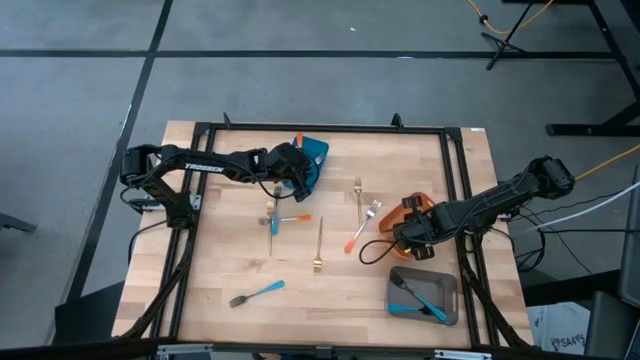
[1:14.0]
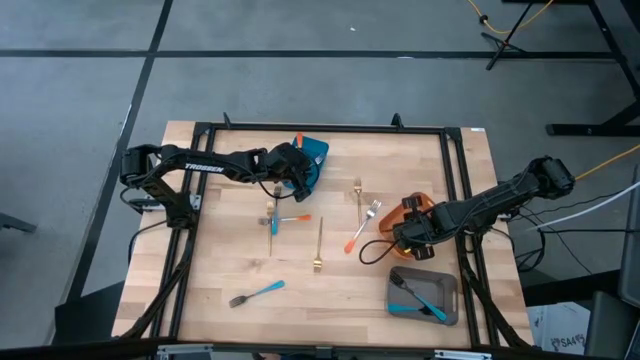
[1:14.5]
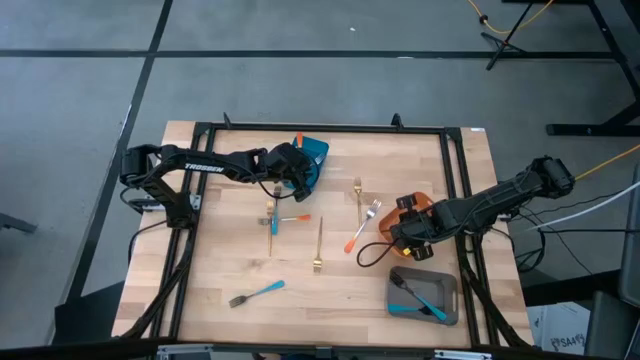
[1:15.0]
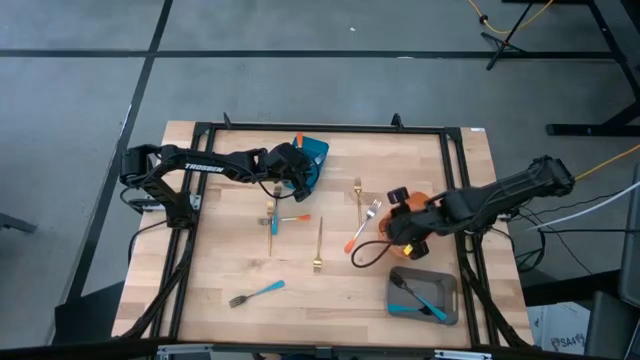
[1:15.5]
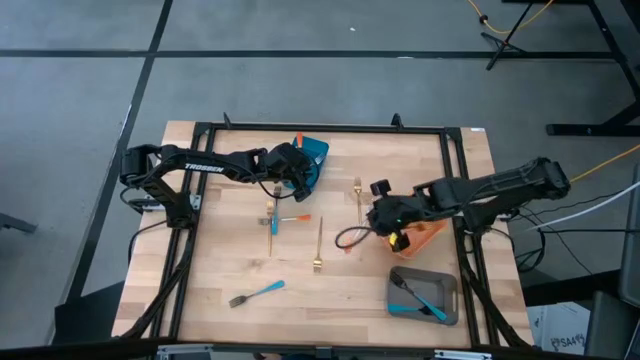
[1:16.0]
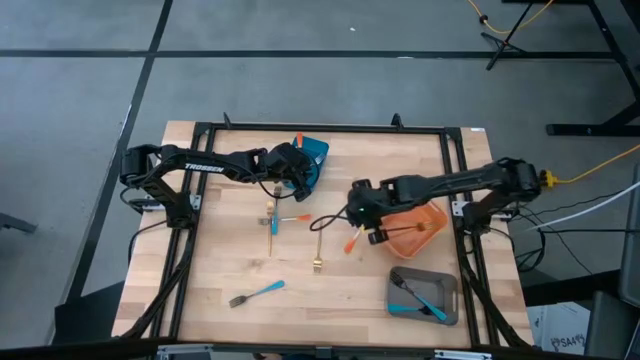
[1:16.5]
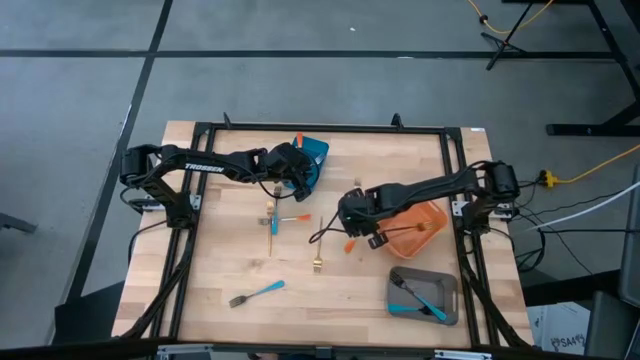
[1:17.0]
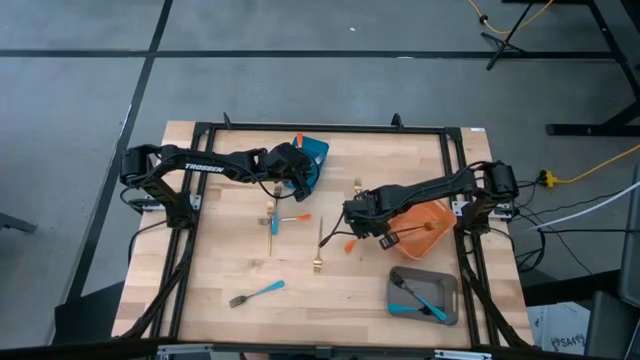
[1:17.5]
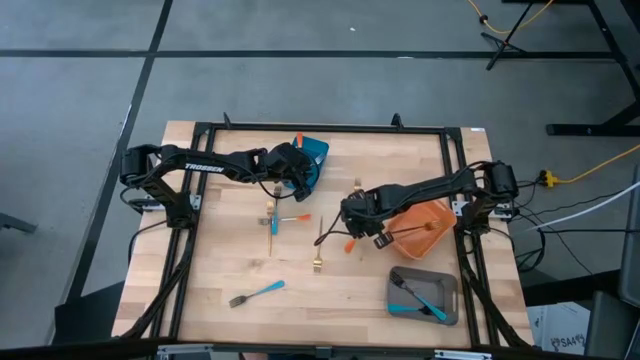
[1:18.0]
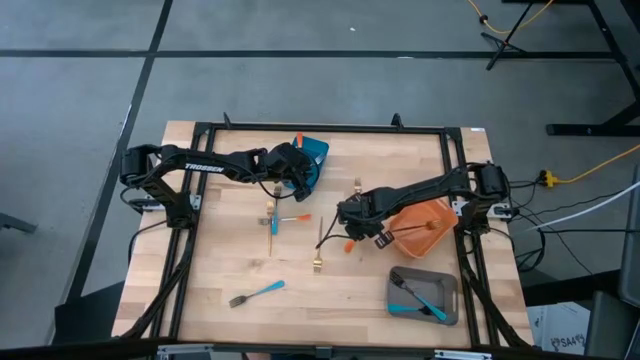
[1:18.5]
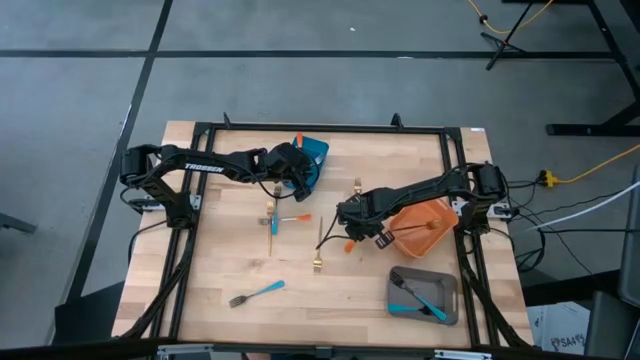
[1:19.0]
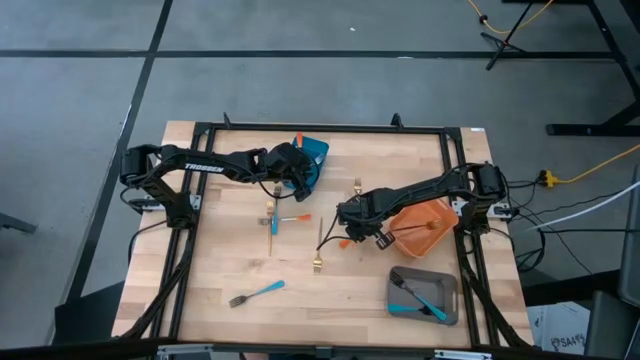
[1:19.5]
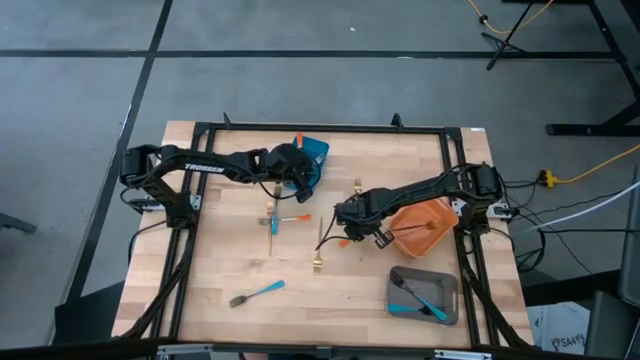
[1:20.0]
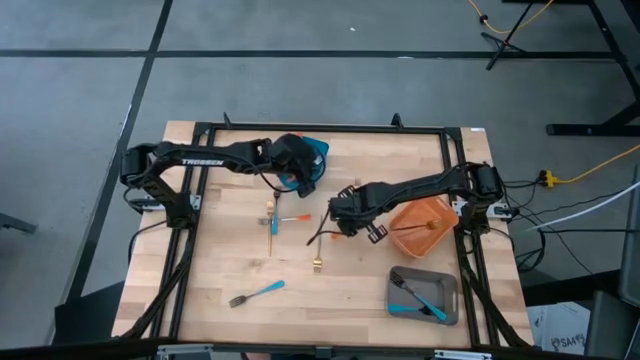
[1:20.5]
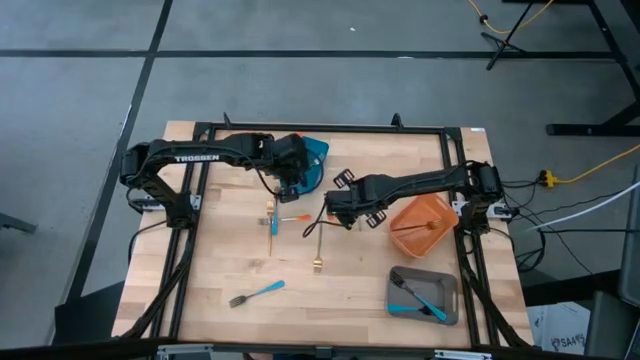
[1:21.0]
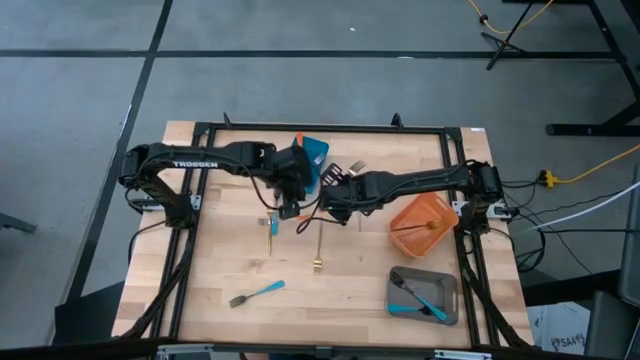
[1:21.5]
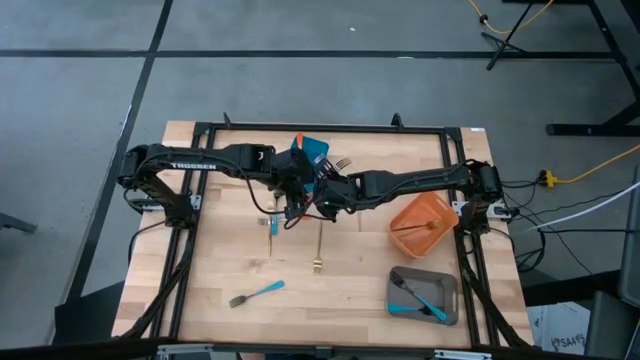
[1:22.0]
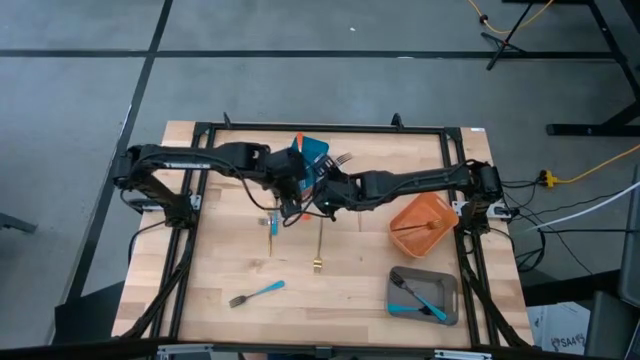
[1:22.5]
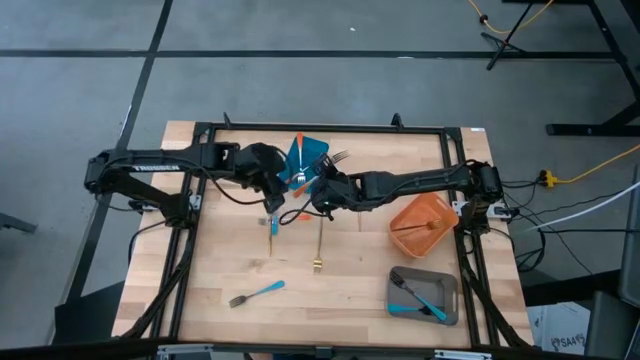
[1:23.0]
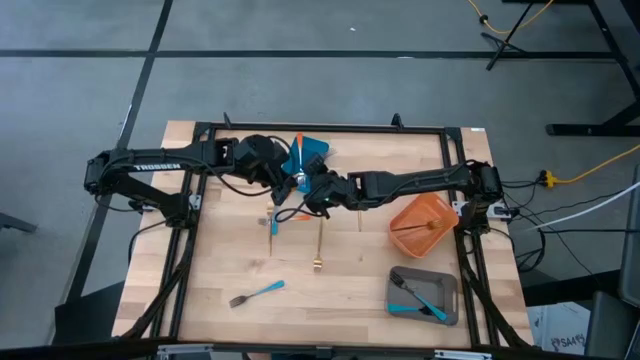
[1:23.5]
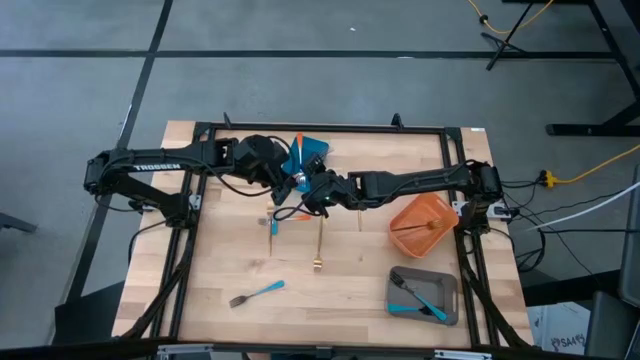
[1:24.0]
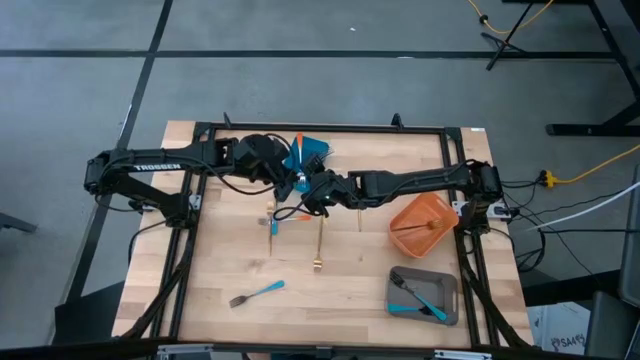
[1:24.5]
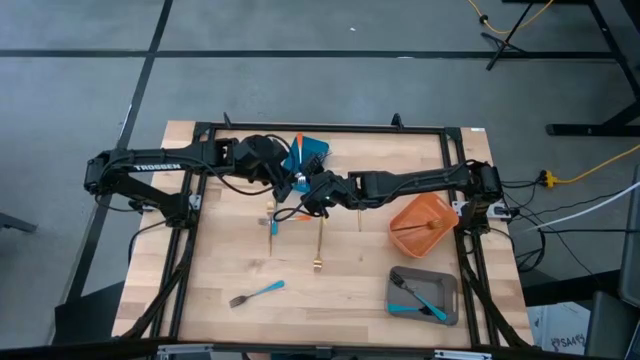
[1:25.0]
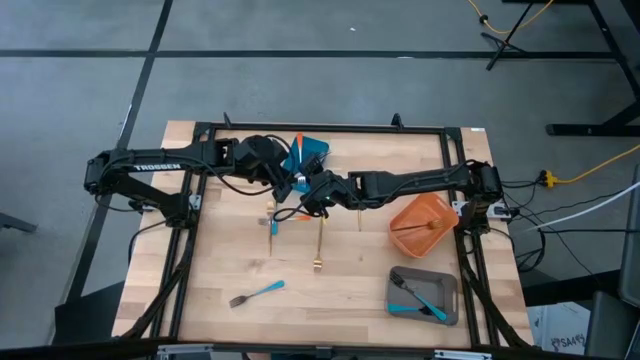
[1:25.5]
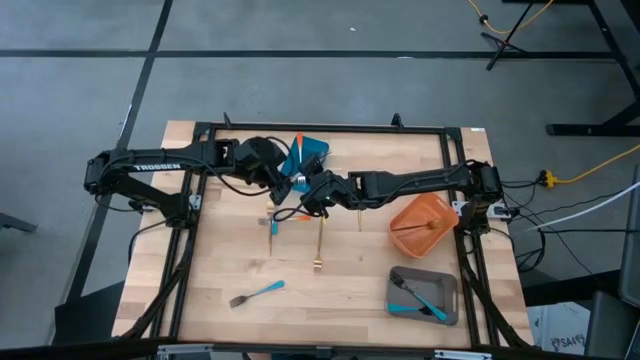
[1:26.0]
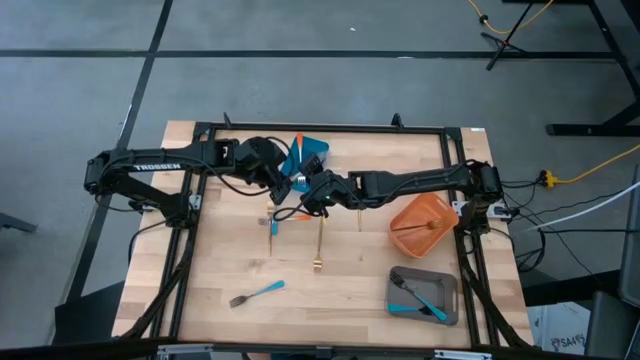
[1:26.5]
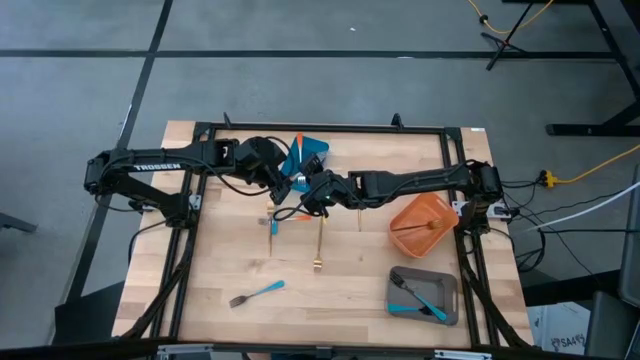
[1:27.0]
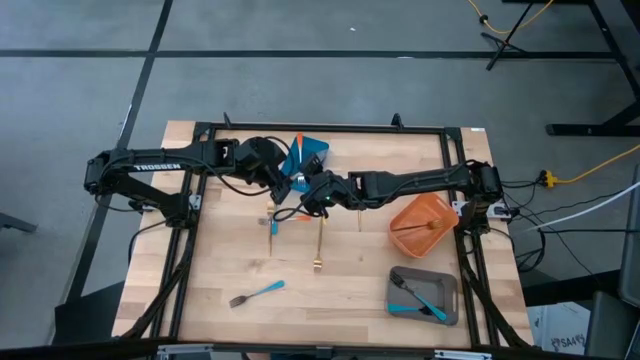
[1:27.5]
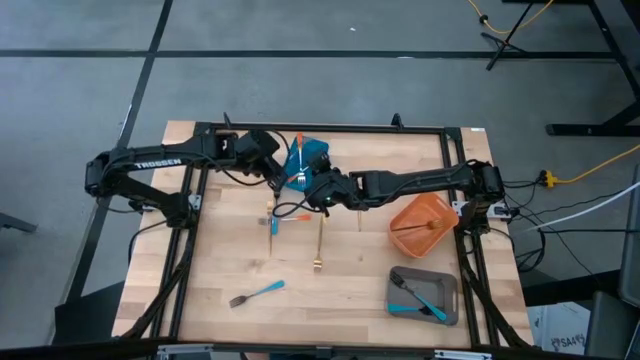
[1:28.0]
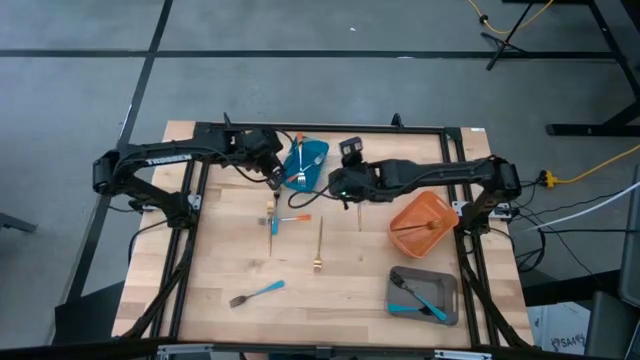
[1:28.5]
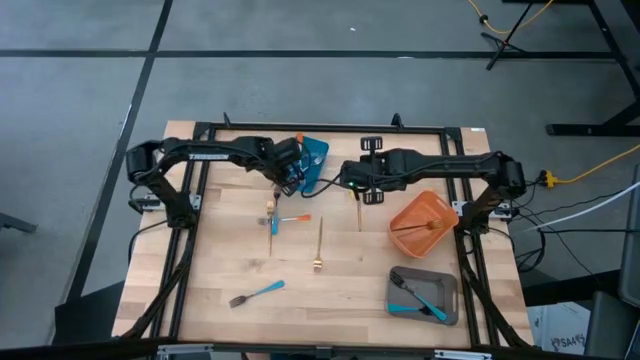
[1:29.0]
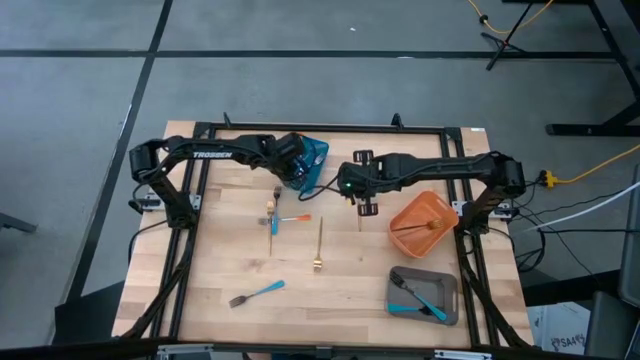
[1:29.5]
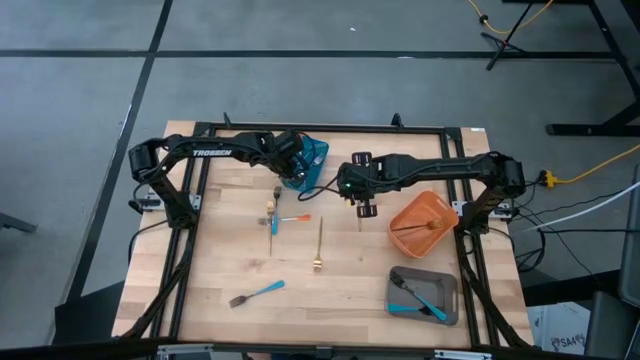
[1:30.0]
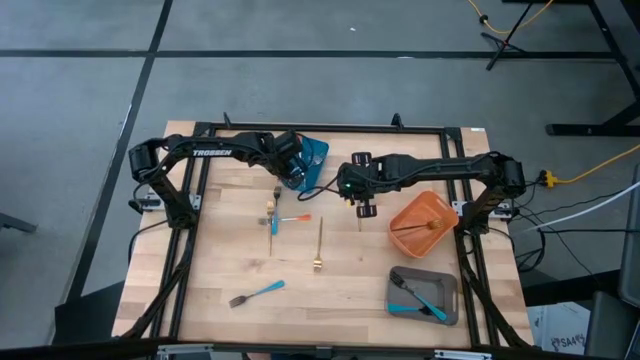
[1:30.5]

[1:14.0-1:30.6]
Task: Sort silverware by color (type)
Put the right orange fork into the blue bin

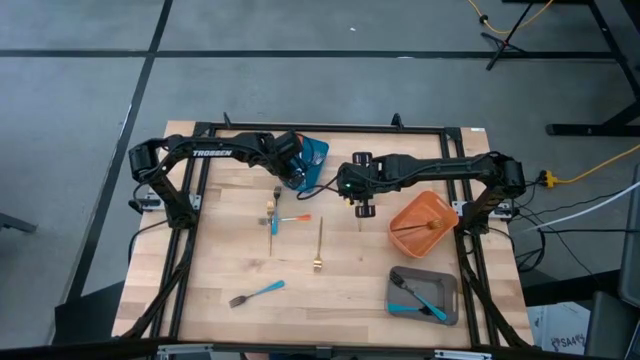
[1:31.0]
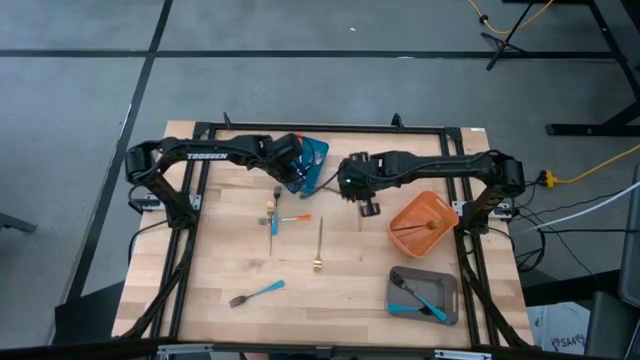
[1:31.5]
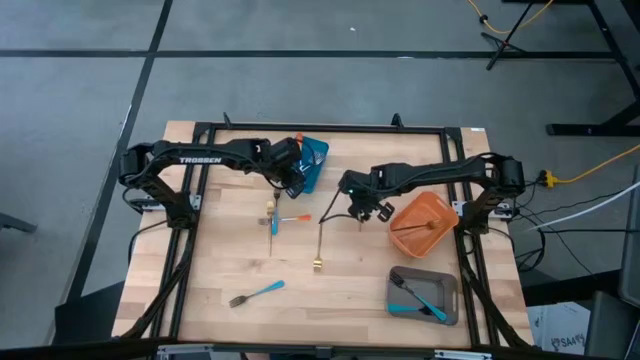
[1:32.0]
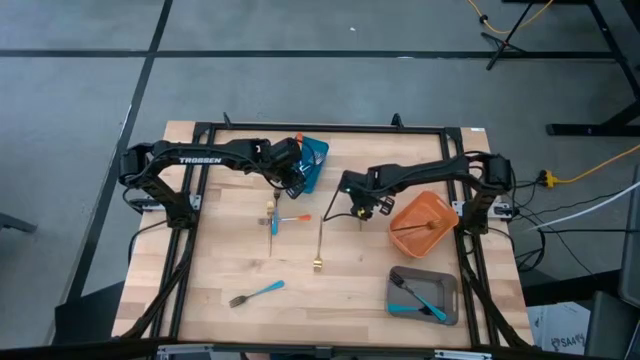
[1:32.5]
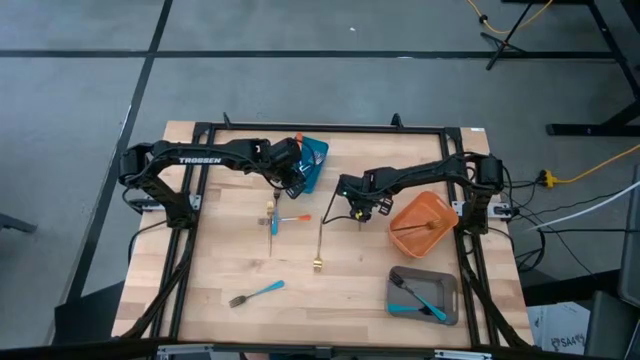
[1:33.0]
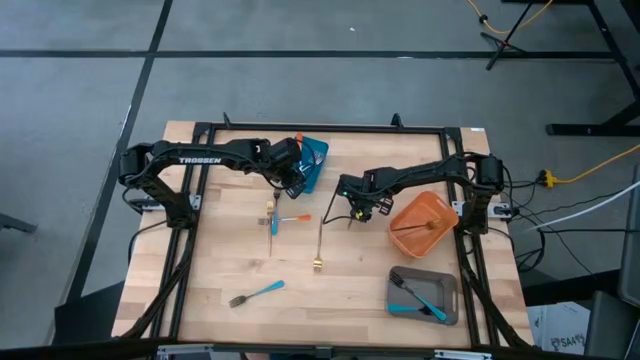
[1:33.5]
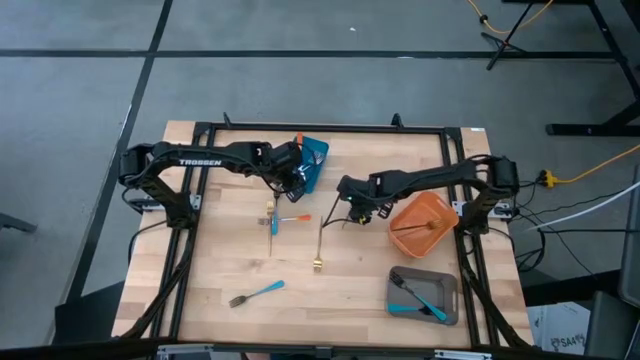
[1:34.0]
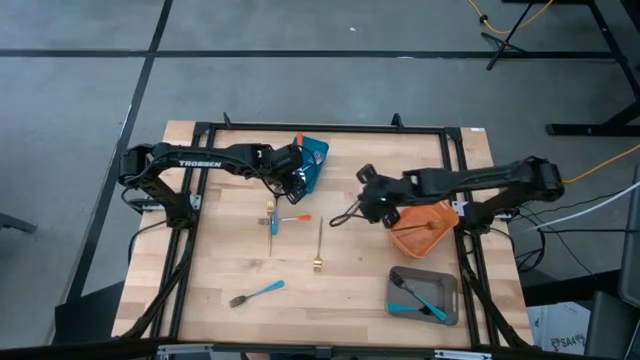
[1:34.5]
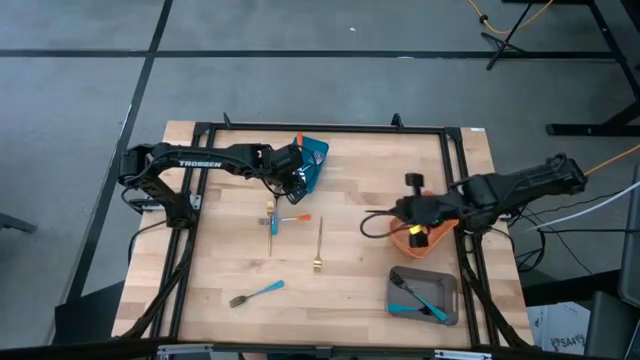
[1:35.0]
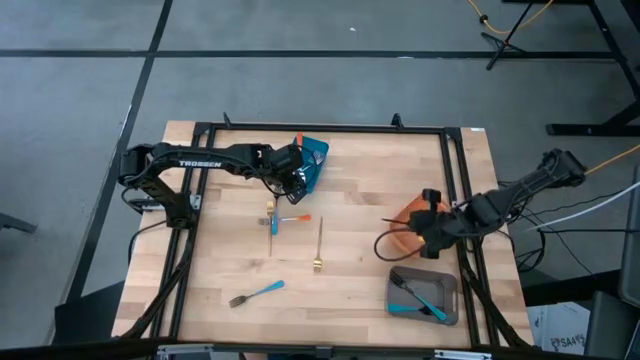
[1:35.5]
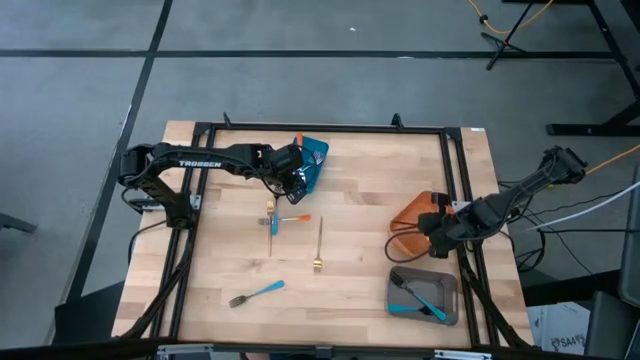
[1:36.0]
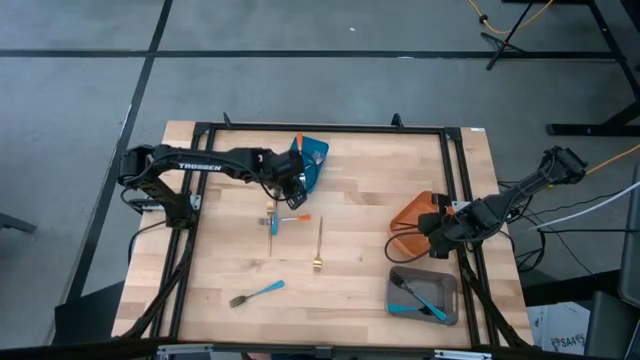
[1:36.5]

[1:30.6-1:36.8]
Put the right gold fork into the orange bin
